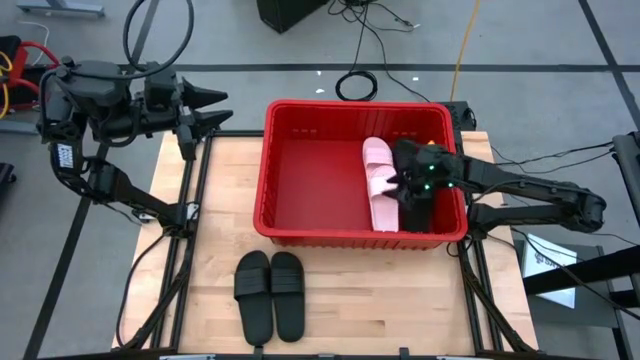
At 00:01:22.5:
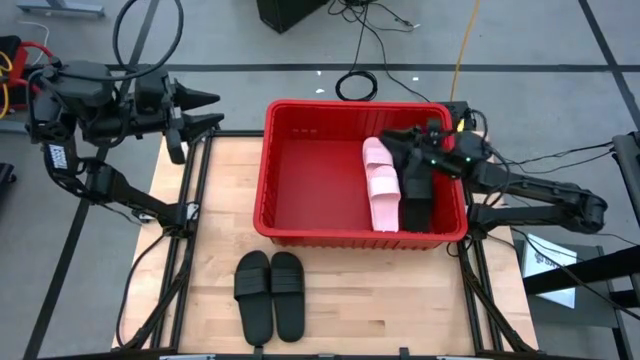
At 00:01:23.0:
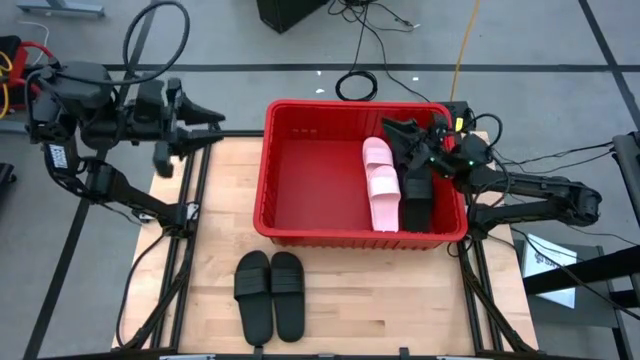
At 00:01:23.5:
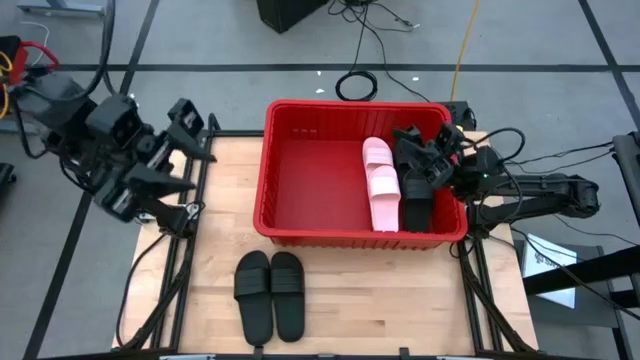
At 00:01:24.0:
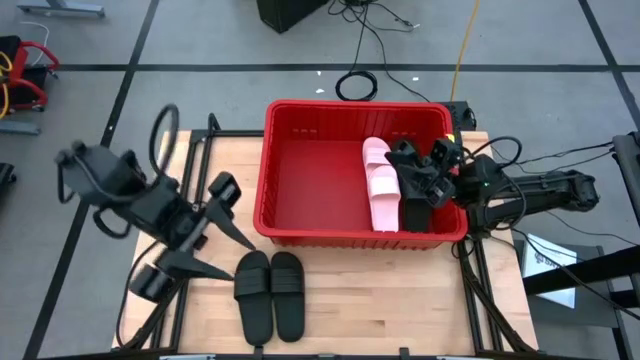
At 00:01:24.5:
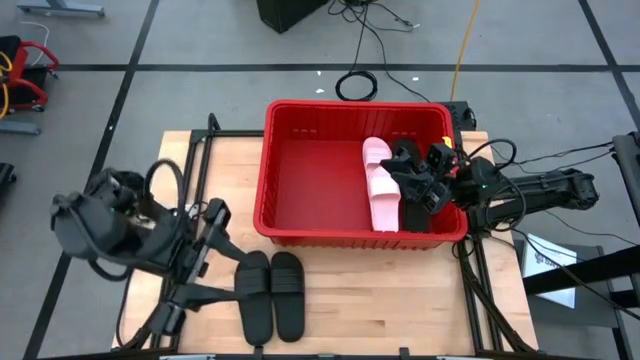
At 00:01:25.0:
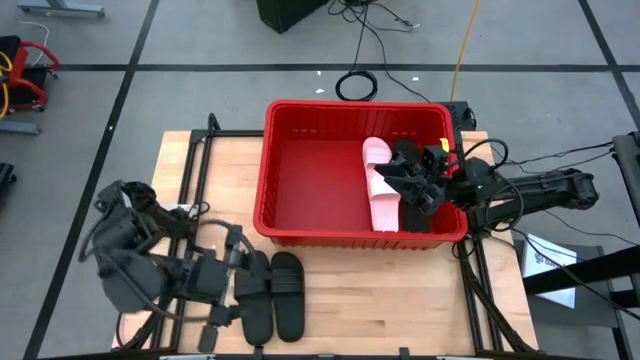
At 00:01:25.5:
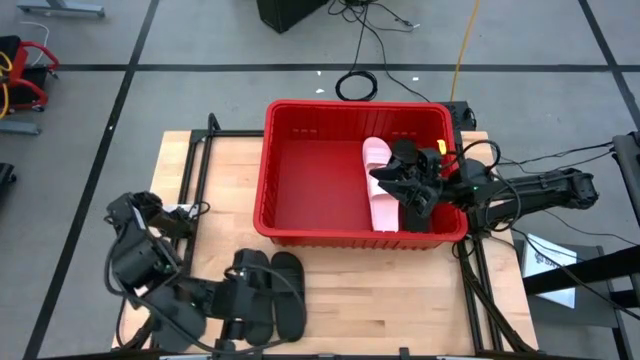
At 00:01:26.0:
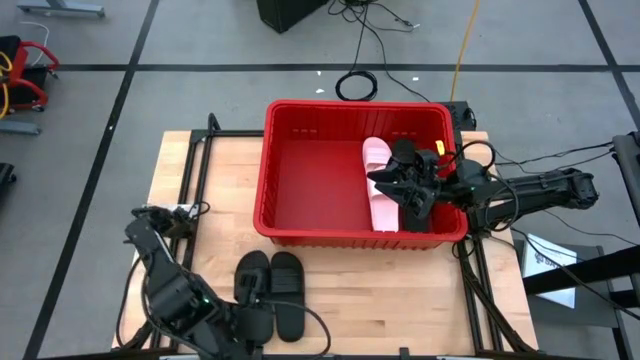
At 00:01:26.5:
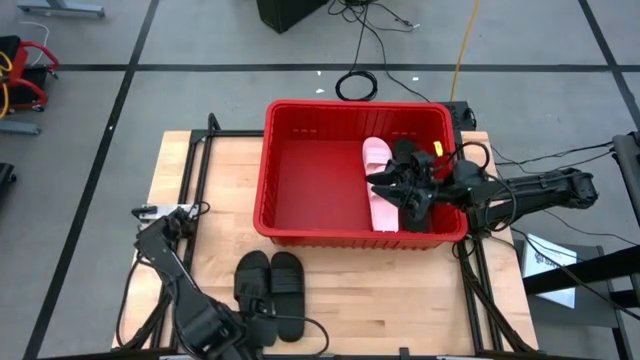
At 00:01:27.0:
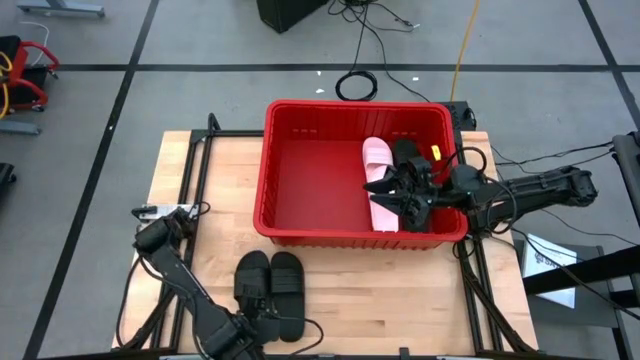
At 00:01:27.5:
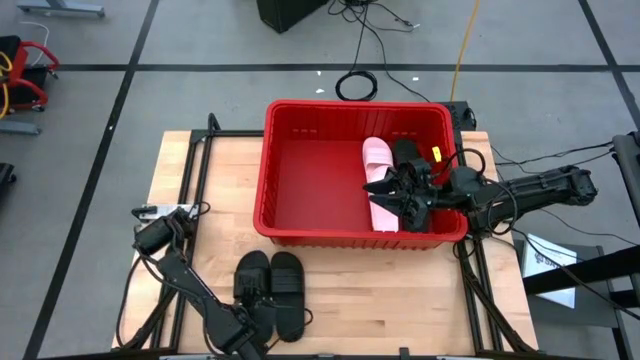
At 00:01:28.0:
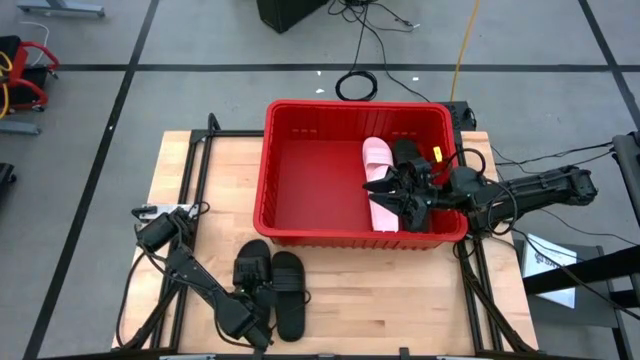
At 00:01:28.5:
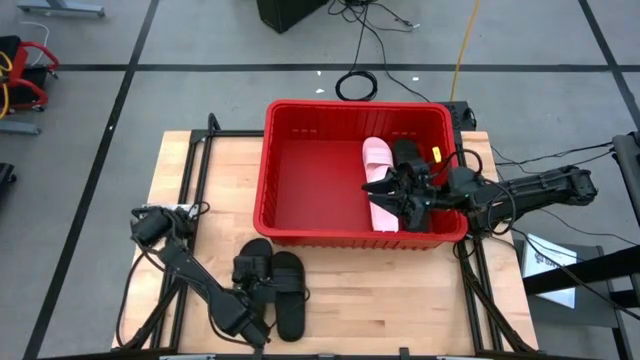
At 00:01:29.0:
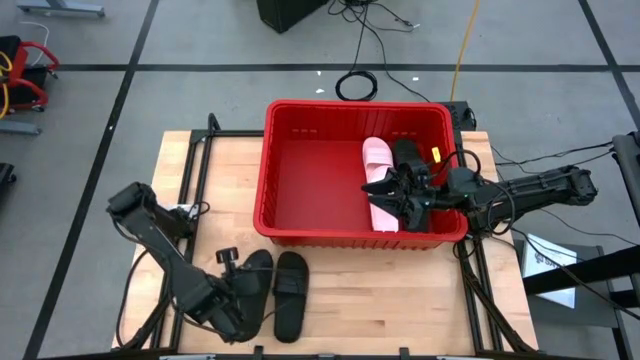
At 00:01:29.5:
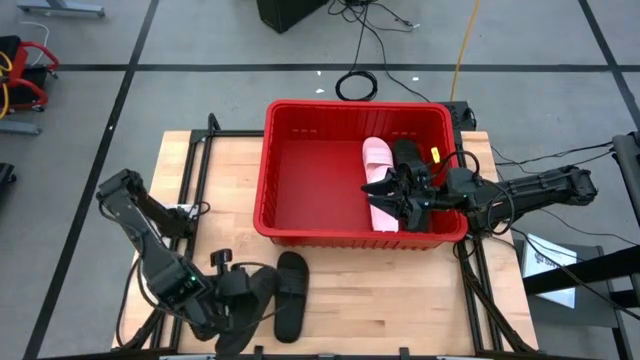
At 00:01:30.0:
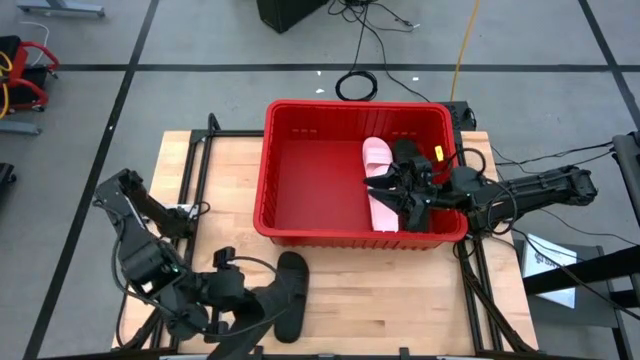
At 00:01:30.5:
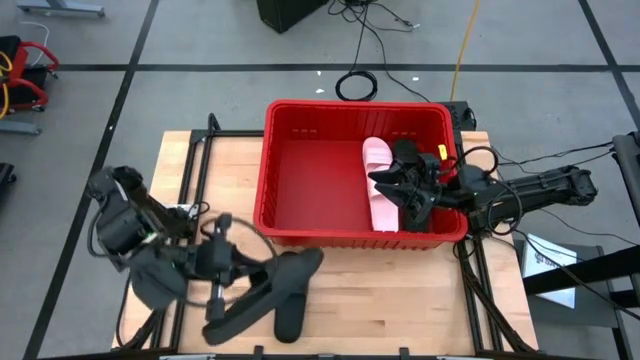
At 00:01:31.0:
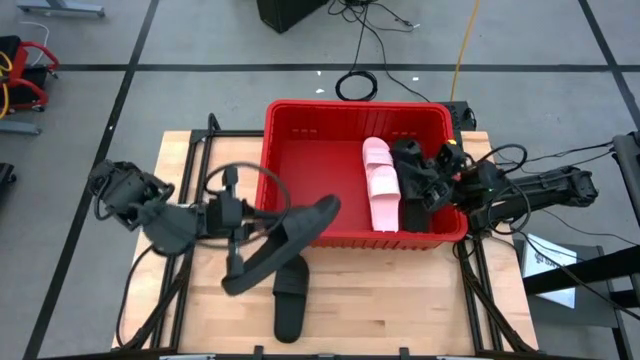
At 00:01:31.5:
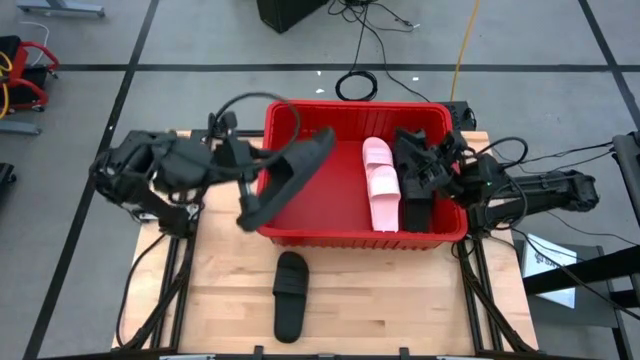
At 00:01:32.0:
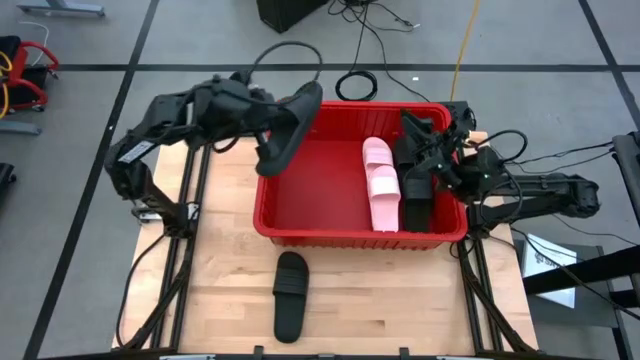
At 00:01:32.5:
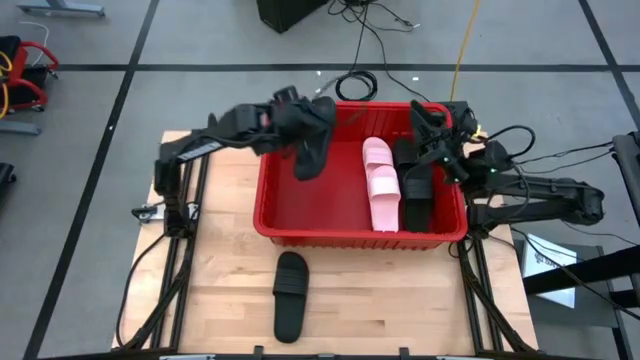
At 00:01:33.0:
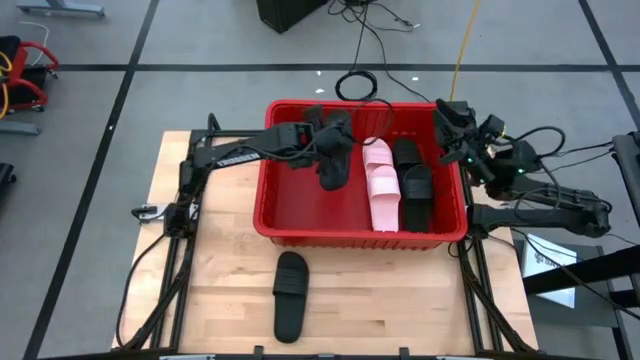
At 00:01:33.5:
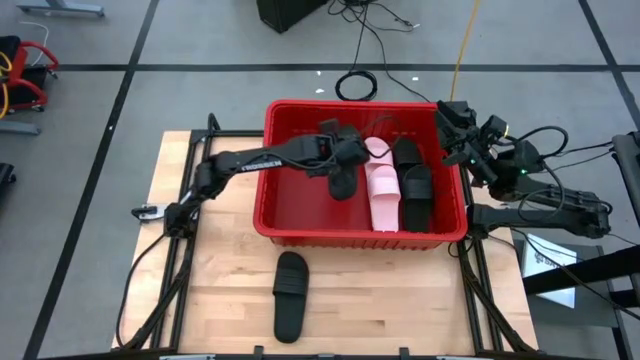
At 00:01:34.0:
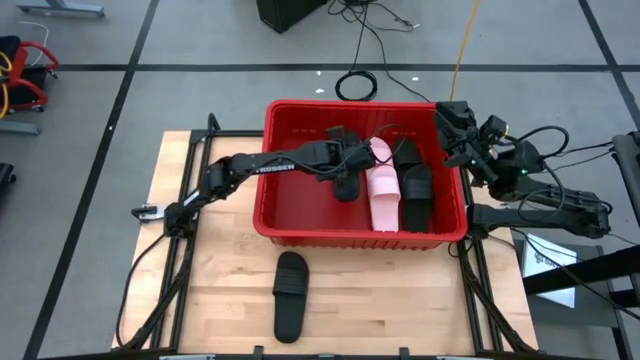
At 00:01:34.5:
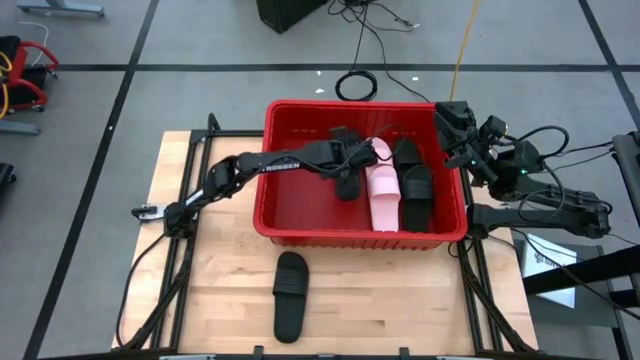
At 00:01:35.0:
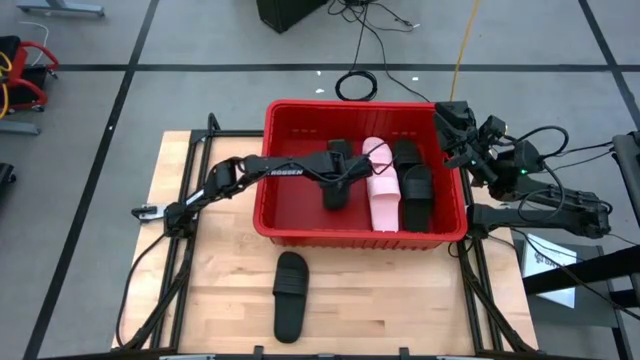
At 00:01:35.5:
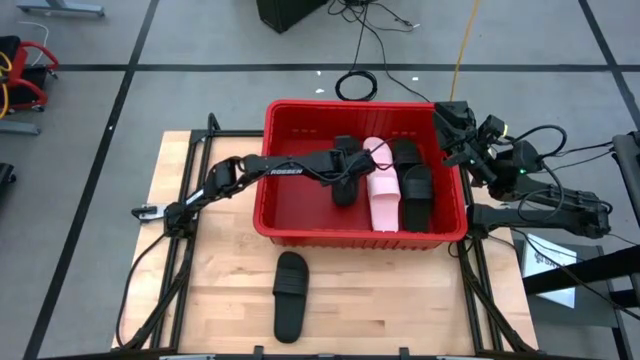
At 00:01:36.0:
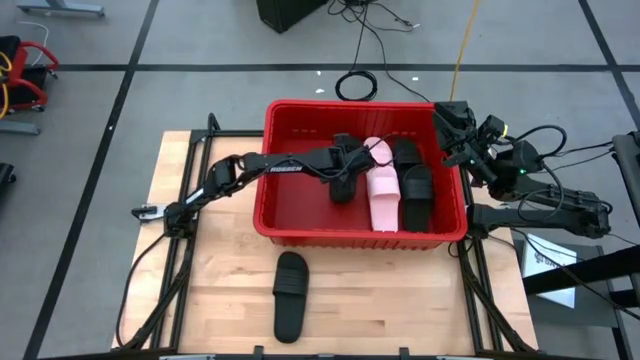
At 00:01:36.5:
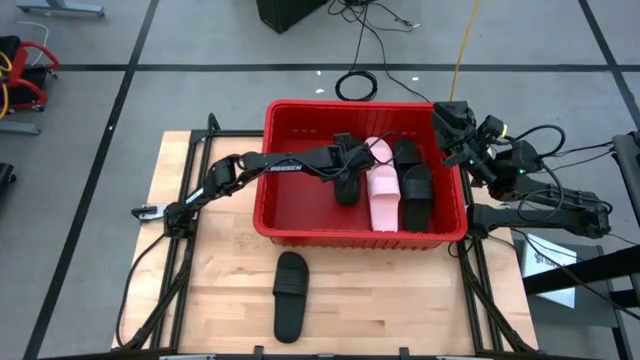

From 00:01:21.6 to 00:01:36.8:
Task: Pick and place slides into bin
Put the black slipper into the red bin

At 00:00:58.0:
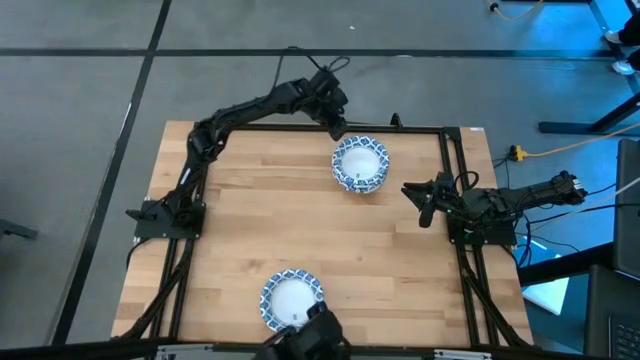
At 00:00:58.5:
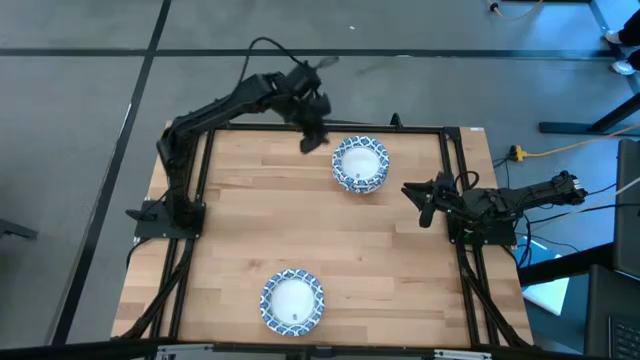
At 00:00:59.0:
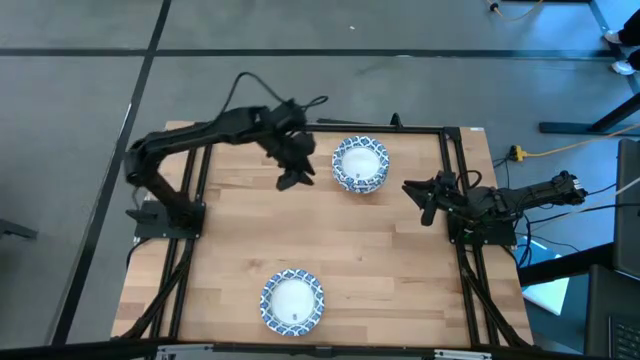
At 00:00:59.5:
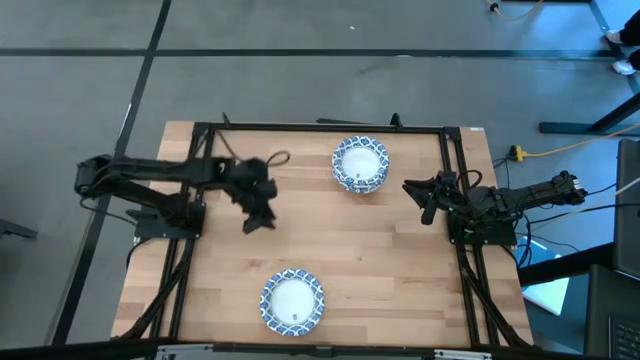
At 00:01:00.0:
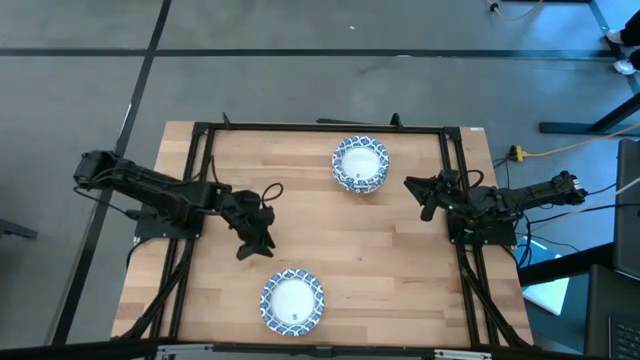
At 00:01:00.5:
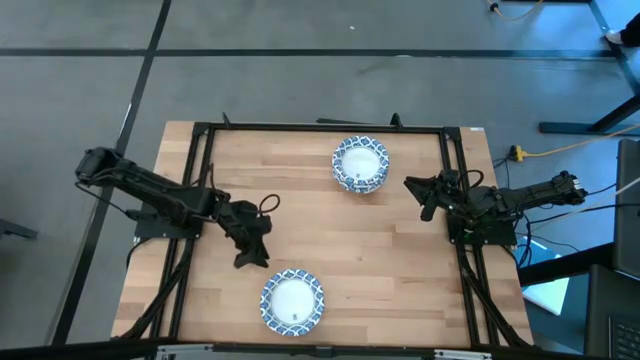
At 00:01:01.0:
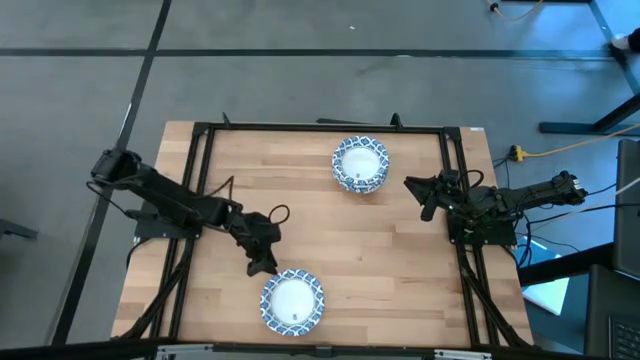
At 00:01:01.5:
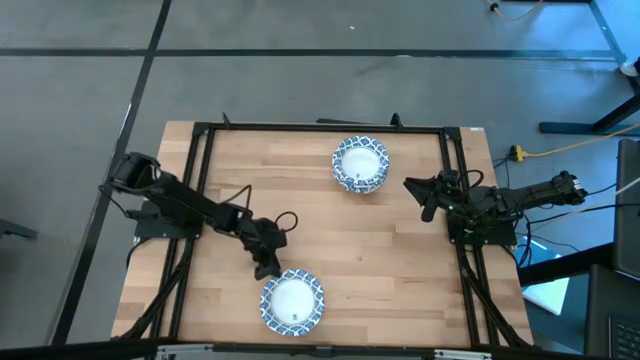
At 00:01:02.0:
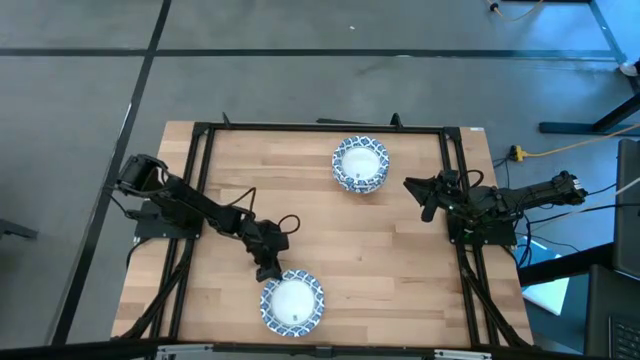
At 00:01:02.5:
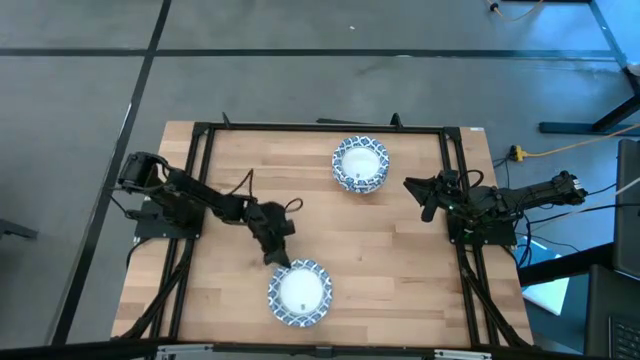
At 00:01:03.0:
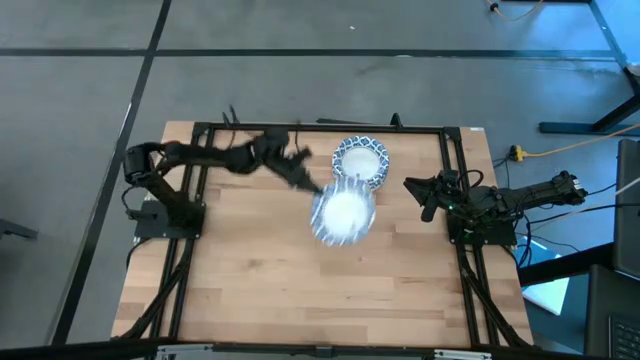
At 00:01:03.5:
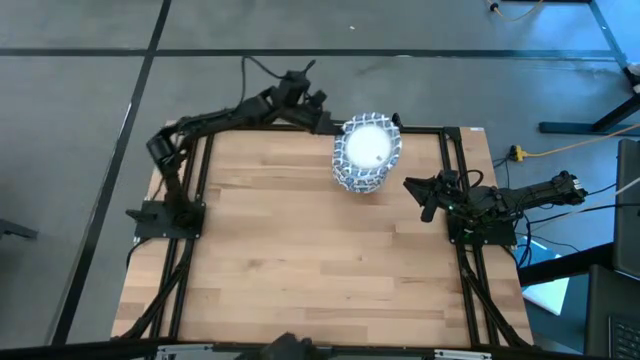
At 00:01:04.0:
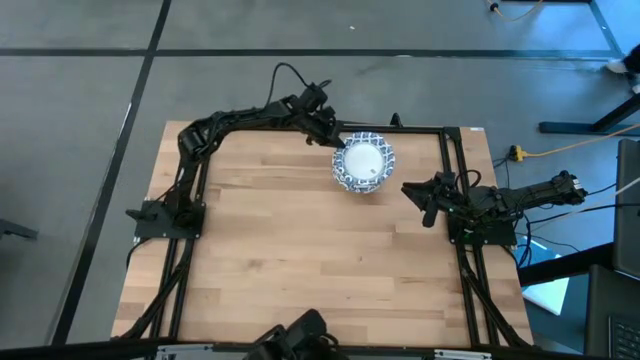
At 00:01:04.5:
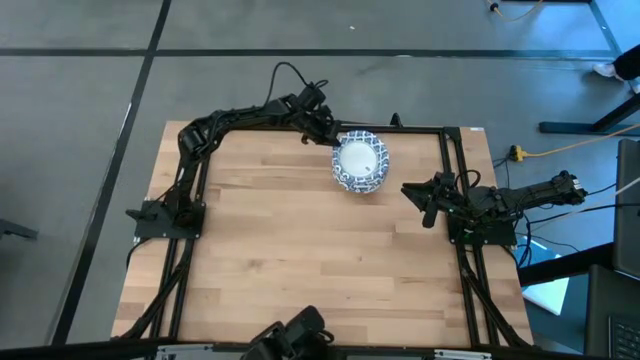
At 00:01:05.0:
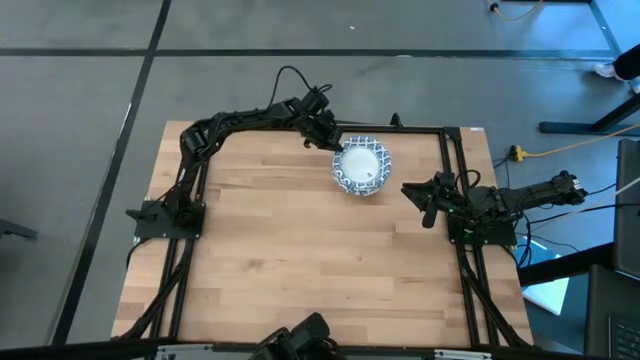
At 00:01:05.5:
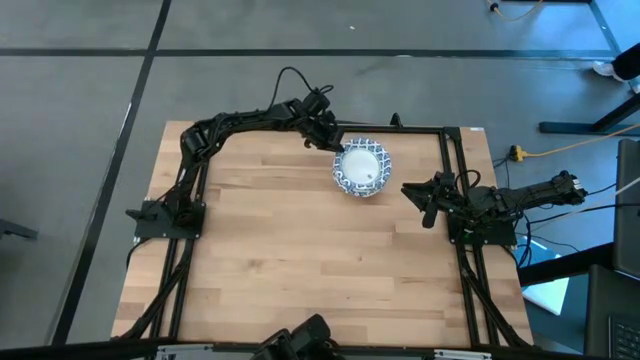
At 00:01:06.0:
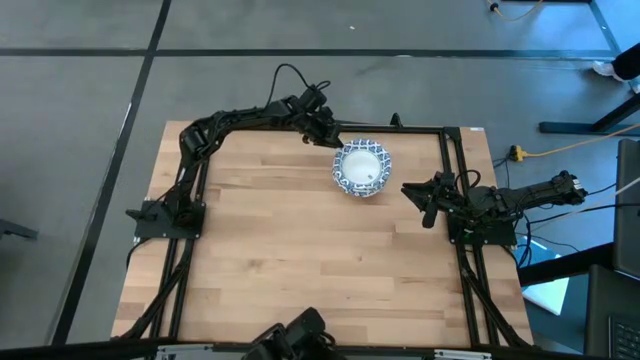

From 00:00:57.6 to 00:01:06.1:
Task: Nest bowls inside each other
Stack the white bowl on the white bowl
